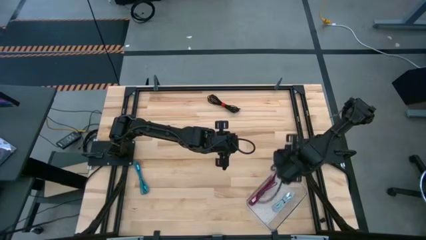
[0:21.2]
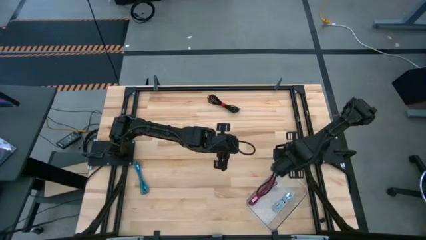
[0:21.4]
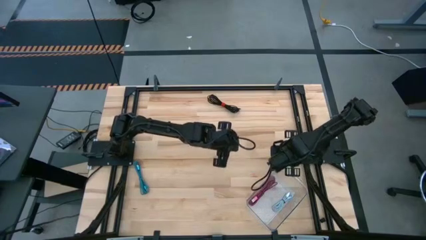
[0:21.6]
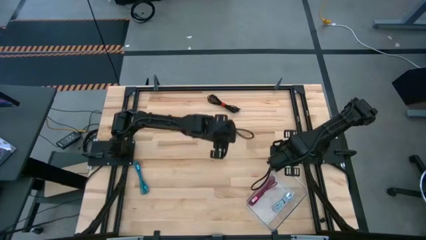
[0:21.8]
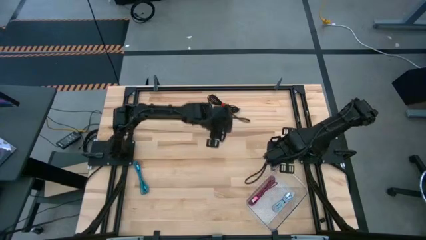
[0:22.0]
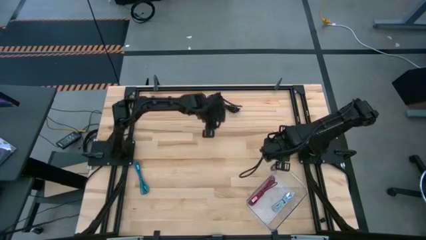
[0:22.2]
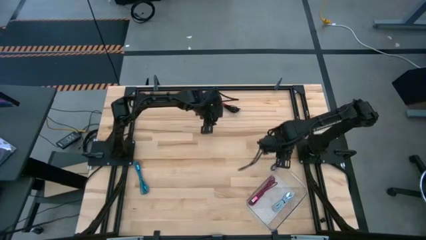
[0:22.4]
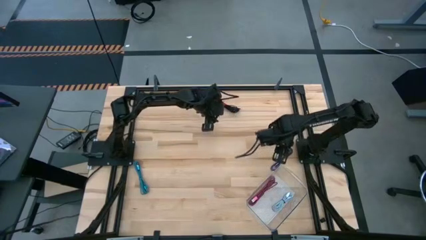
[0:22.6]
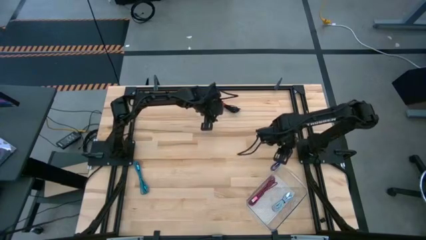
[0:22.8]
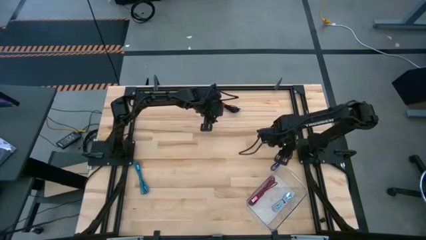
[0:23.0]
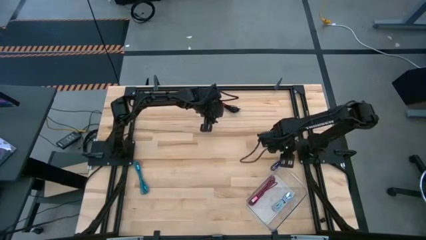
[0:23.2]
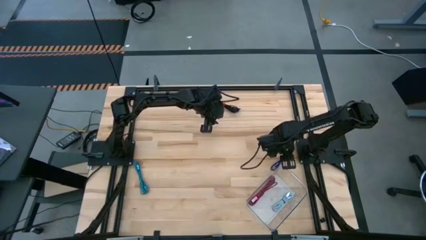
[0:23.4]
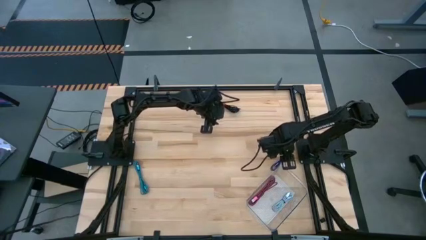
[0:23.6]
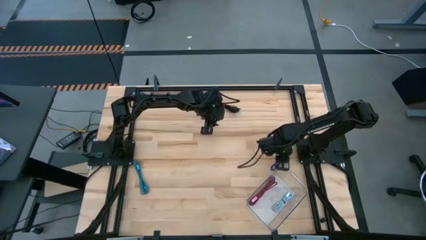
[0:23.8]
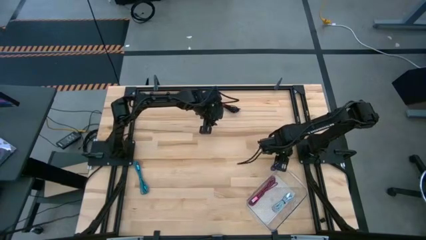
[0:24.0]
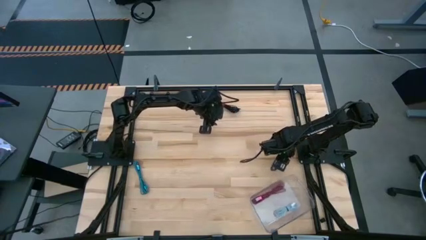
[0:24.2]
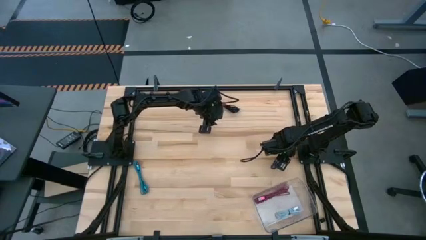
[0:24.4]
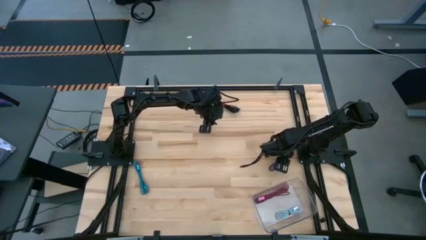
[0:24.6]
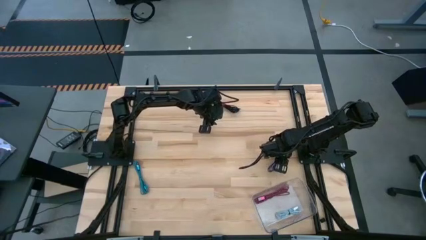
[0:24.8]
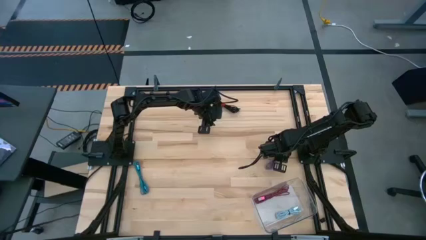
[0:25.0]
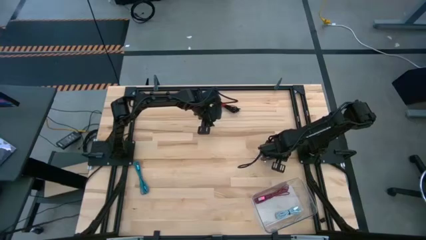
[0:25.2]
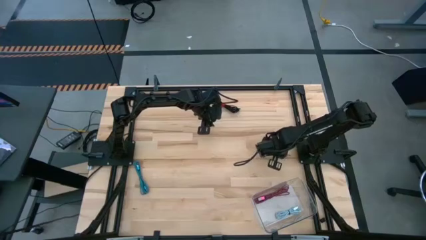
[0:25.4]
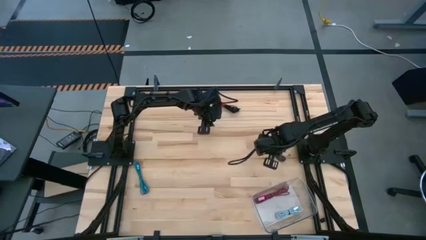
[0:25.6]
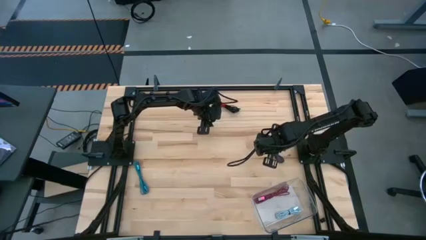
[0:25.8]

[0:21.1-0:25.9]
Task: Pick and place USB-C Cables
Put the dark blue USB cable into the transparent bin

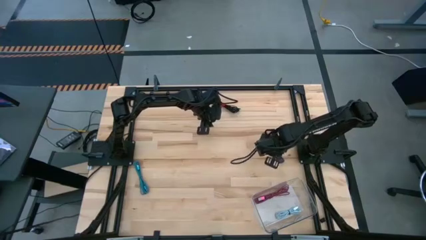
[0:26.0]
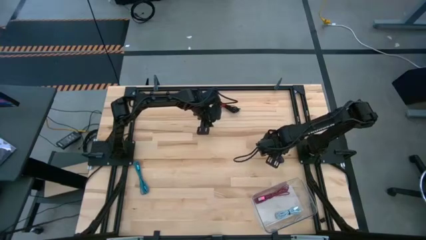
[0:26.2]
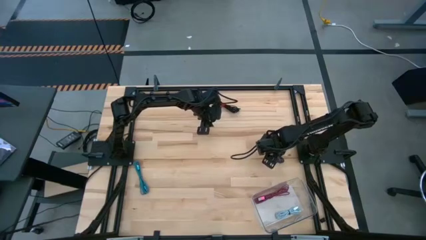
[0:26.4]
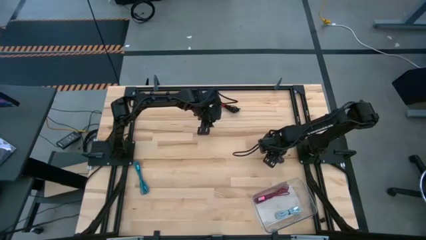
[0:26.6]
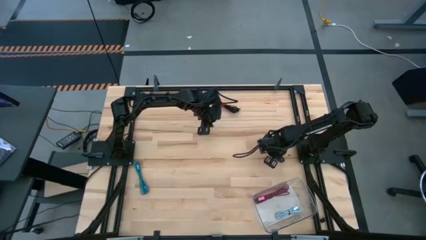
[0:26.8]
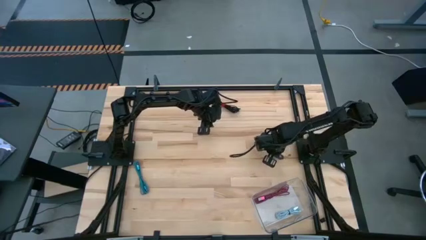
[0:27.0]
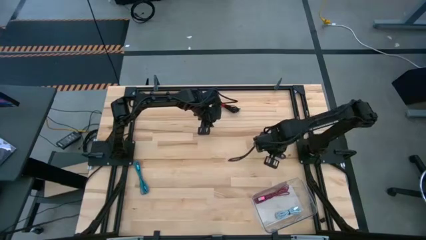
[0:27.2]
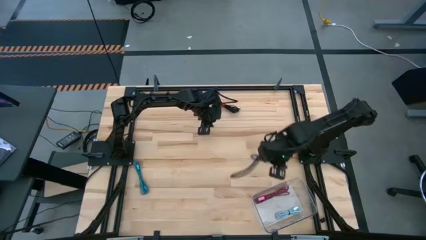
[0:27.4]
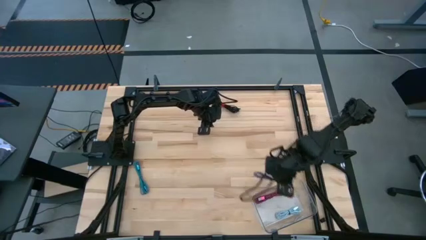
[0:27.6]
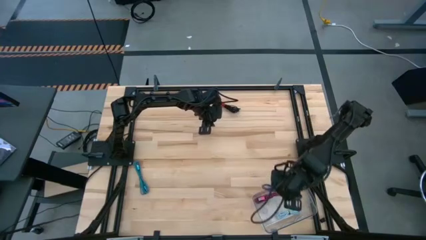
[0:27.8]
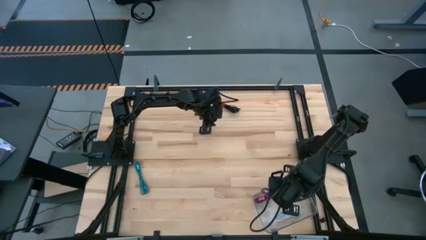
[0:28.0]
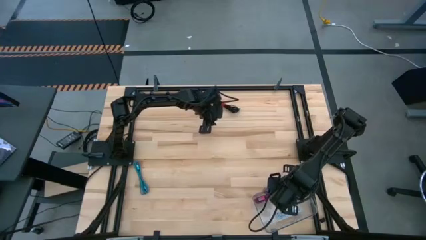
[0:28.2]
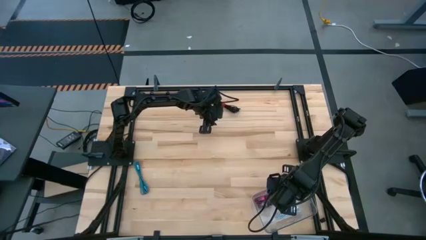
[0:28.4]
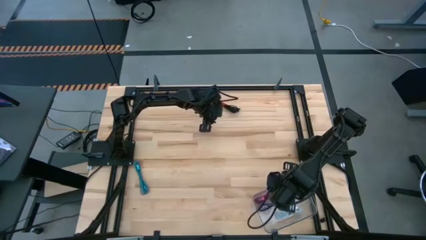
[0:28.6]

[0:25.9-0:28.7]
Put the dark blue USB cable into the transparent bin

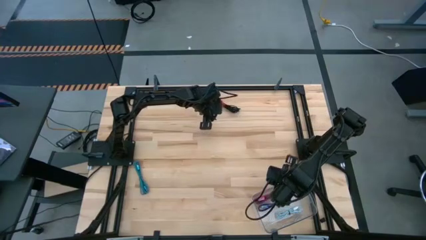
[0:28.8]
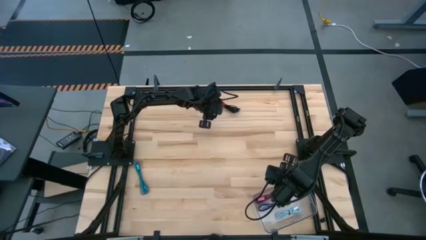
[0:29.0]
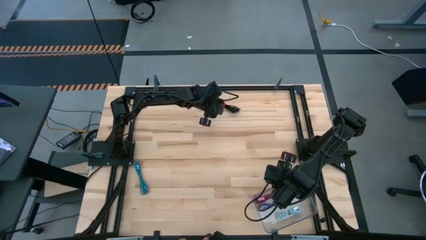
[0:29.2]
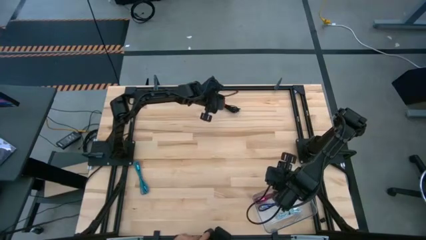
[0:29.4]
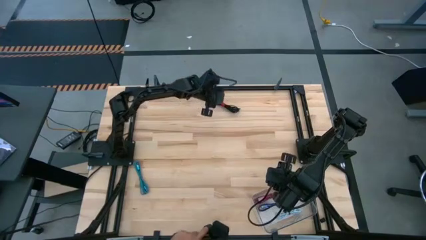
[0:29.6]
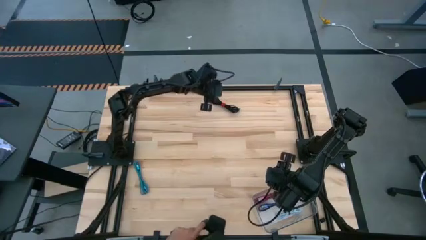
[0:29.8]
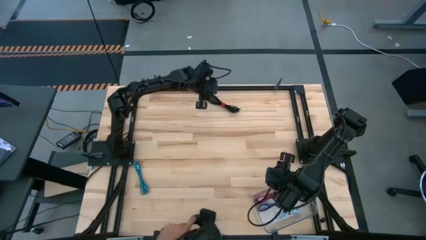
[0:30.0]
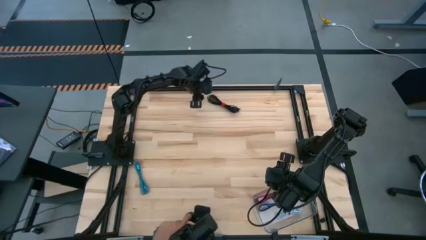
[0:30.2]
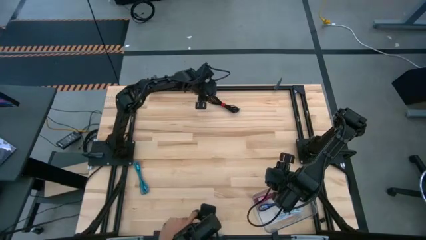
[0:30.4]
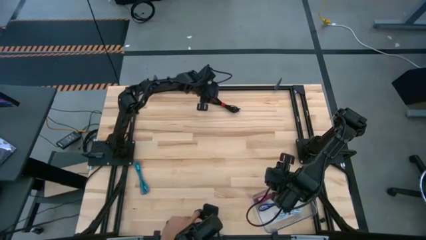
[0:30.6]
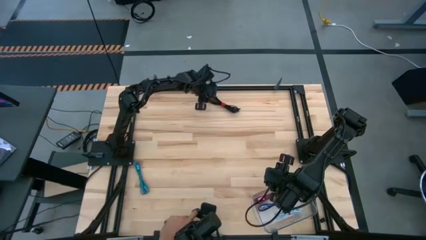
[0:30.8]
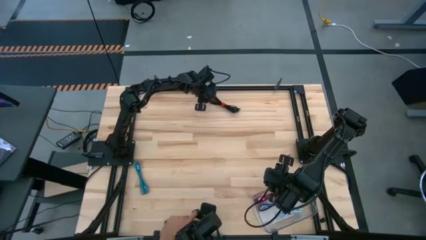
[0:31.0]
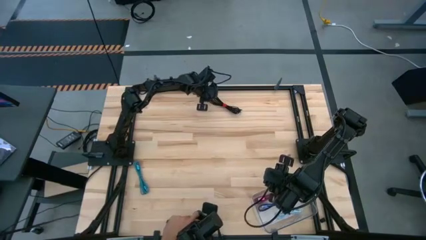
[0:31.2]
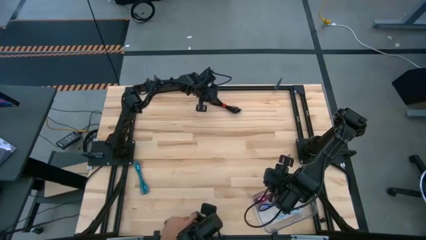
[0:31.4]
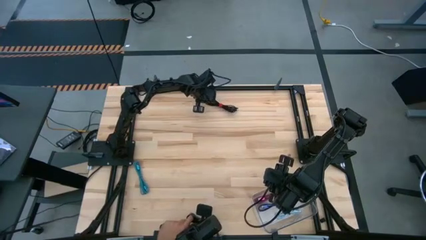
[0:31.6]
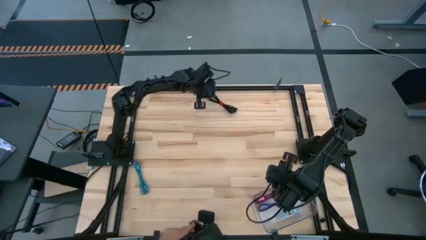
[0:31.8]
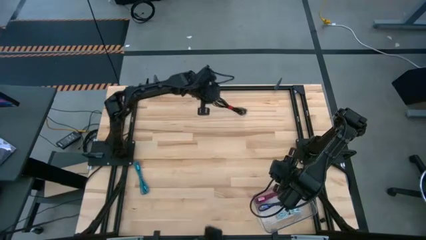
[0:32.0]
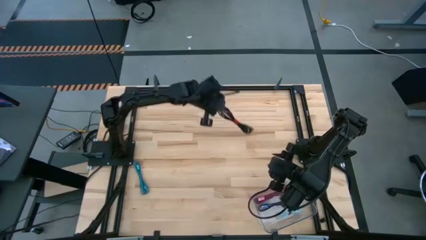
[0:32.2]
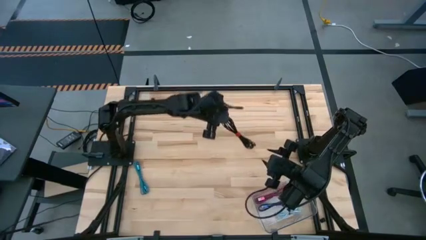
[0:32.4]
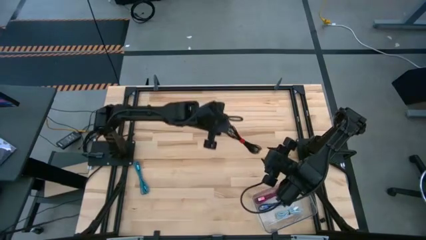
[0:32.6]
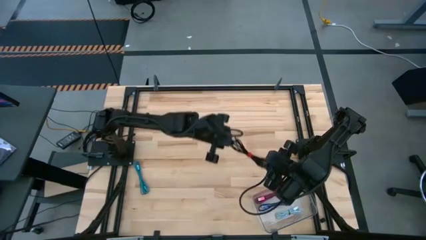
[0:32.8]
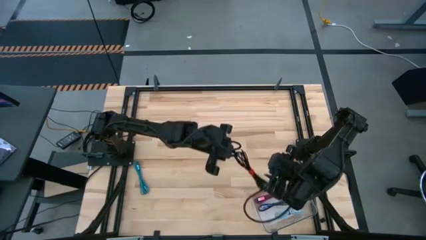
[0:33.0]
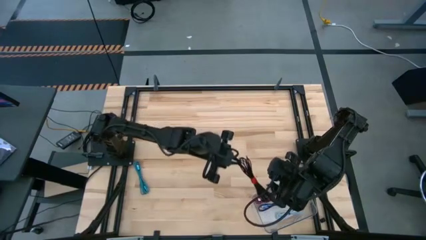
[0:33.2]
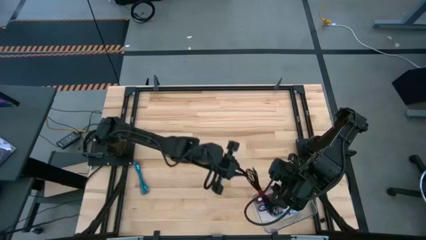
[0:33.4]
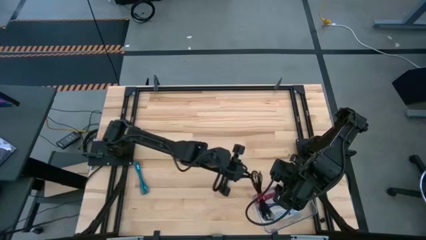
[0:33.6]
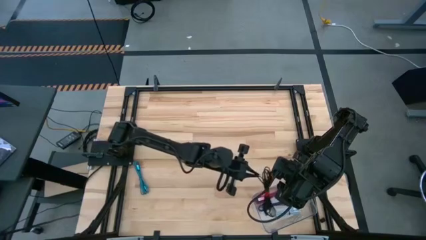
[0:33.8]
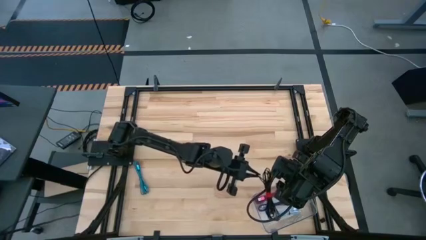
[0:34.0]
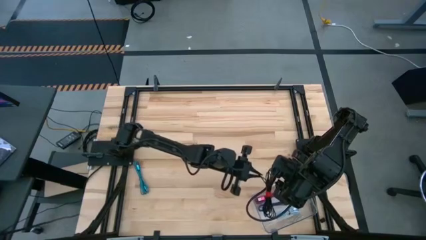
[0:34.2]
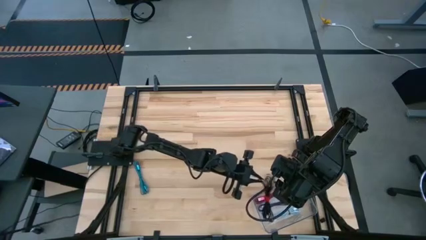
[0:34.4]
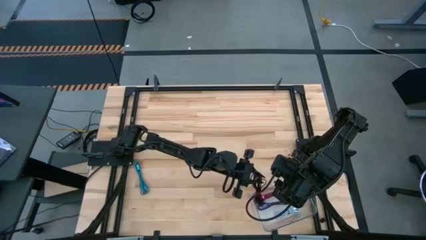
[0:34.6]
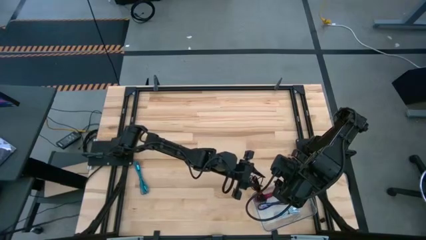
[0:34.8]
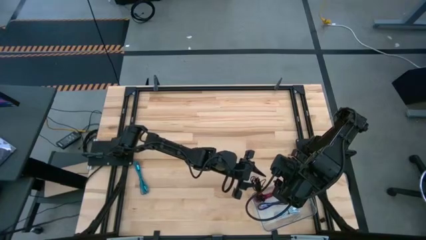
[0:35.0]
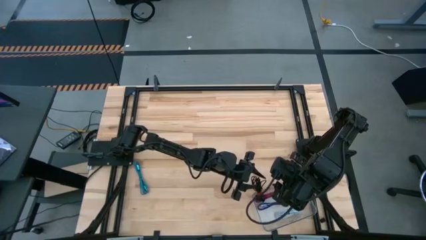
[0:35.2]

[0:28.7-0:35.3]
Put the black USB cable into the transparent bin

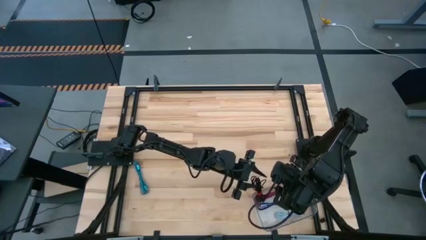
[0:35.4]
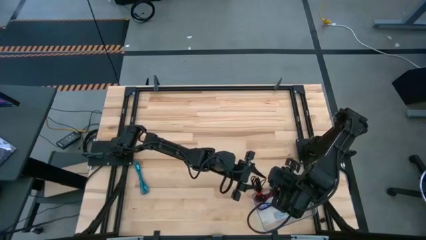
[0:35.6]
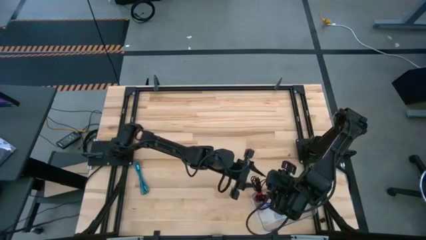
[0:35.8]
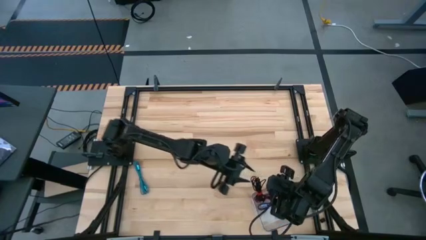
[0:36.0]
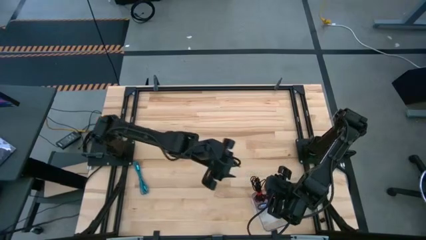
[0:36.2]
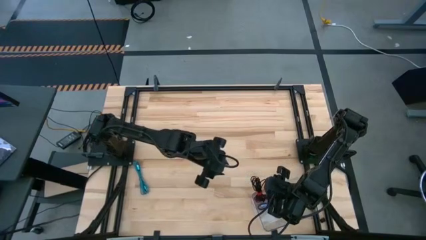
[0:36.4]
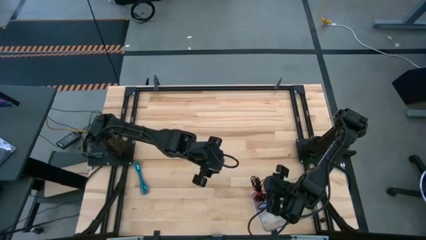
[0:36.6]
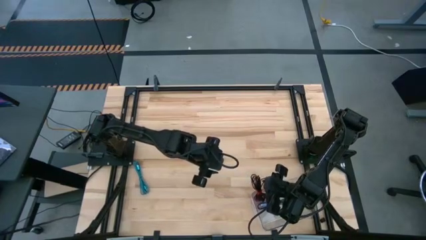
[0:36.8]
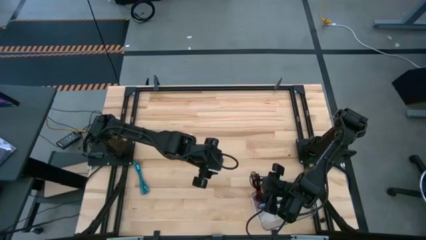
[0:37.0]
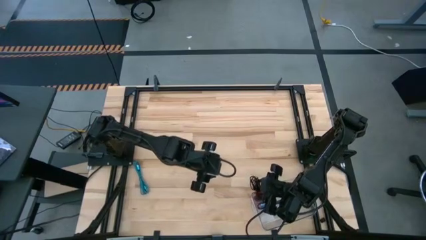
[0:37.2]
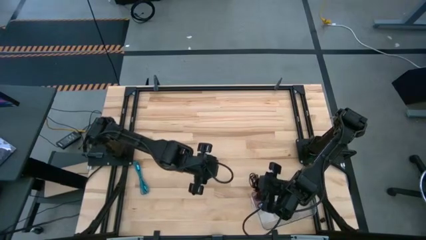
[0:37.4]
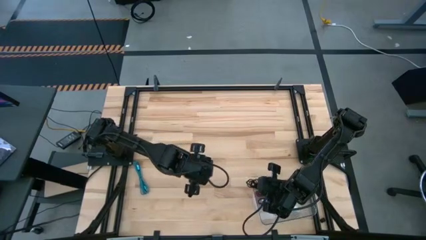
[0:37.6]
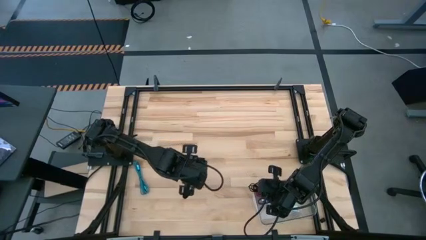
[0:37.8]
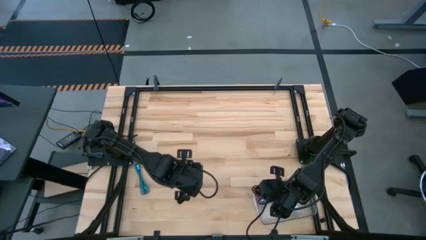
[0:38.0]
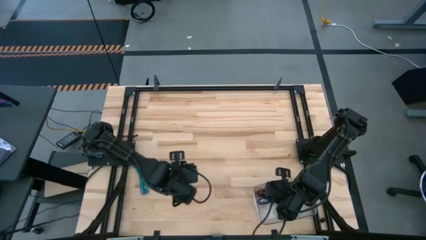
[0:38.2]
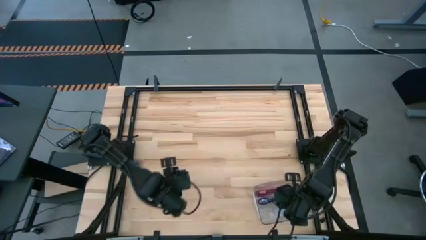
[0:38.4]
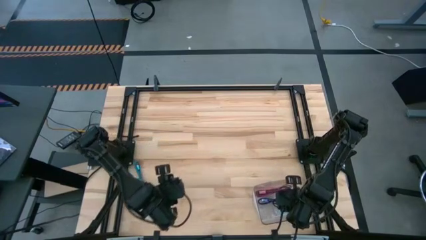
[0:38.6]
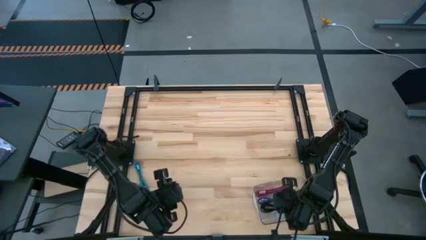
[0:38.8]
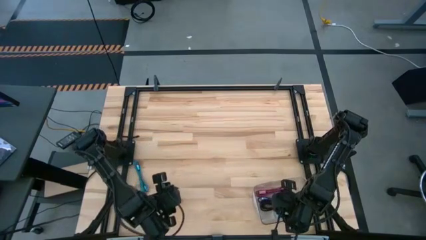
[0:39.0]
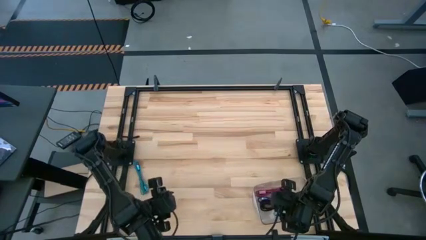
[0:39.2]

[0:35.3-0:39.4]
Put the black USB cable into the transparent bin
